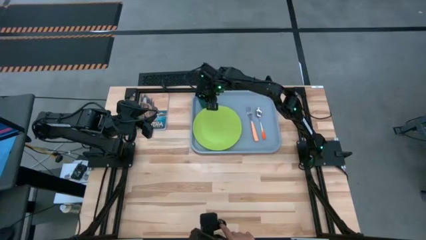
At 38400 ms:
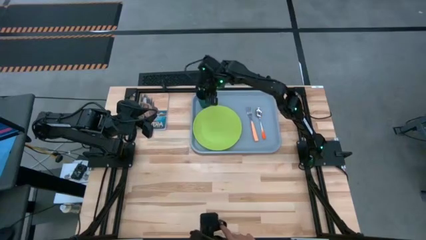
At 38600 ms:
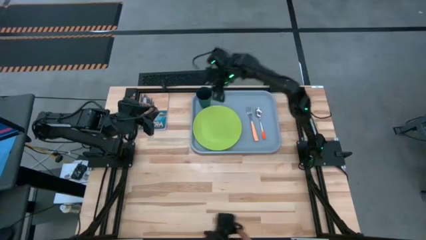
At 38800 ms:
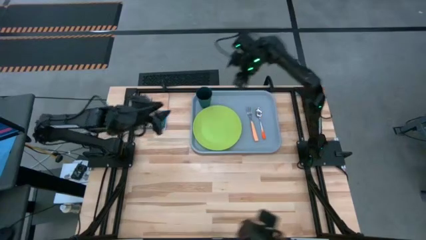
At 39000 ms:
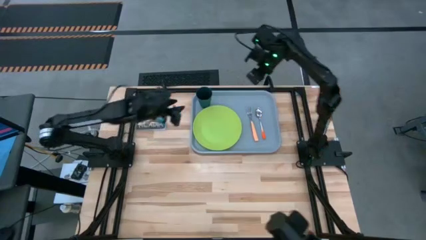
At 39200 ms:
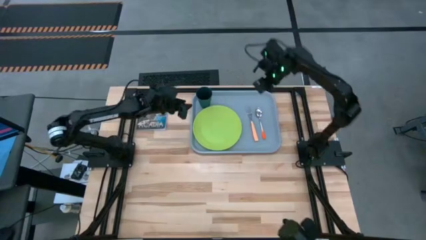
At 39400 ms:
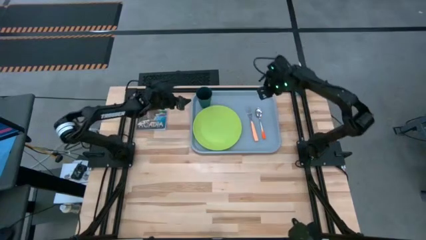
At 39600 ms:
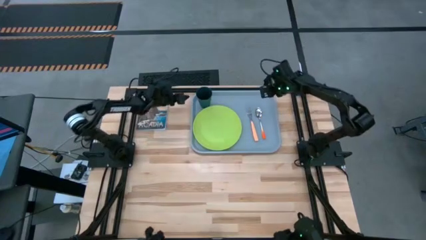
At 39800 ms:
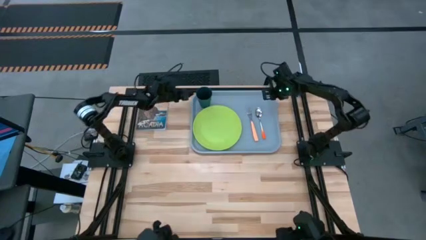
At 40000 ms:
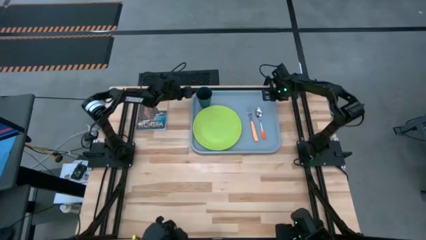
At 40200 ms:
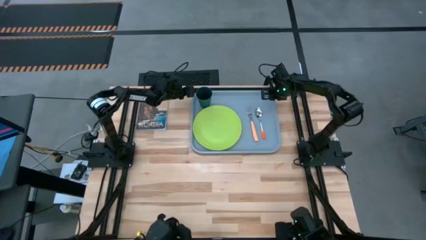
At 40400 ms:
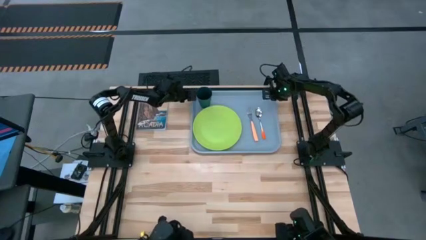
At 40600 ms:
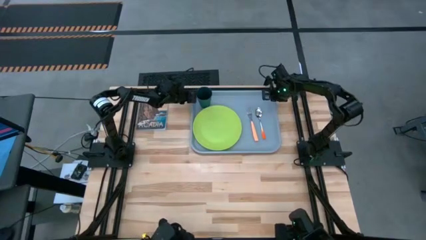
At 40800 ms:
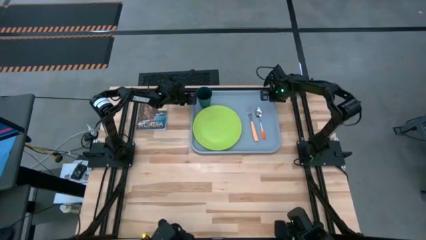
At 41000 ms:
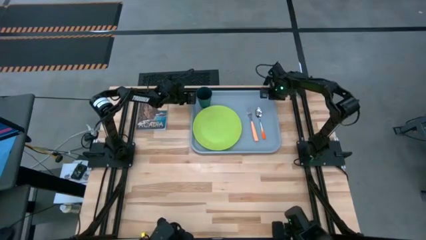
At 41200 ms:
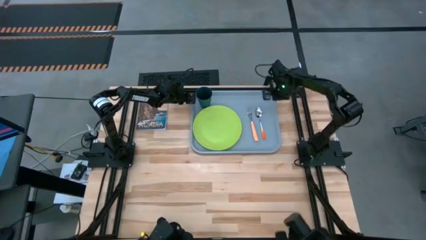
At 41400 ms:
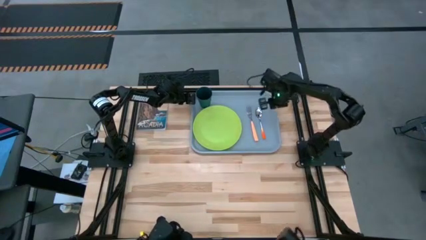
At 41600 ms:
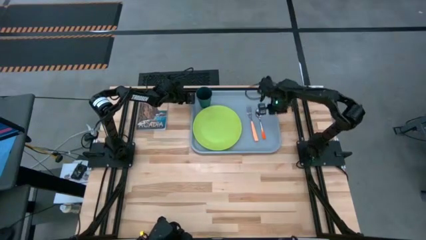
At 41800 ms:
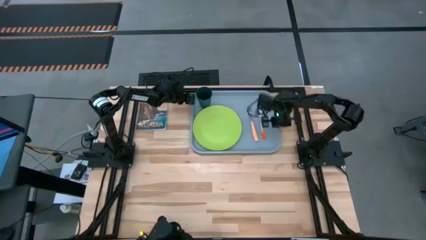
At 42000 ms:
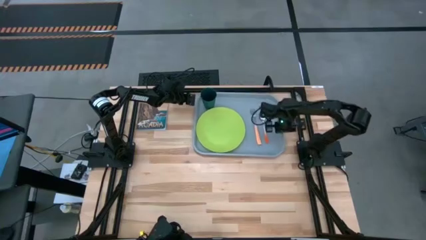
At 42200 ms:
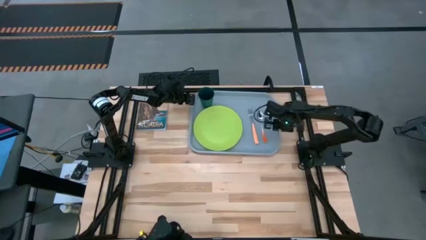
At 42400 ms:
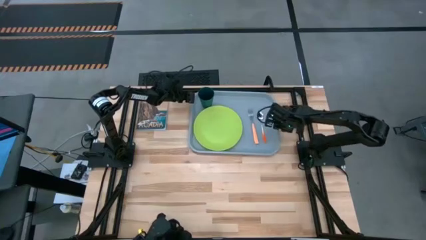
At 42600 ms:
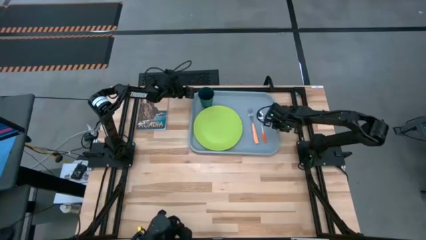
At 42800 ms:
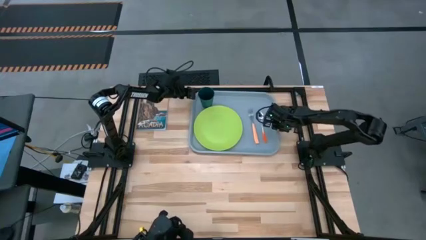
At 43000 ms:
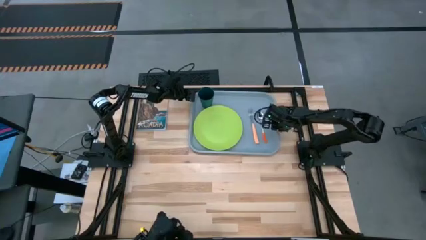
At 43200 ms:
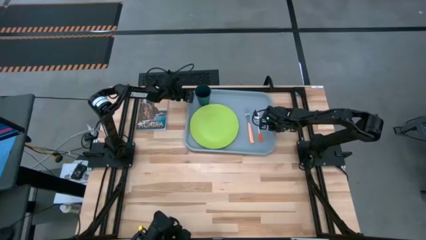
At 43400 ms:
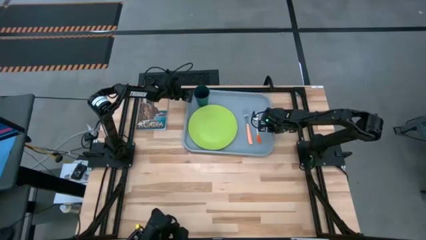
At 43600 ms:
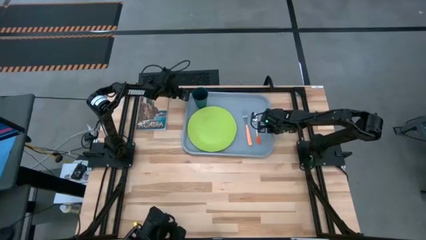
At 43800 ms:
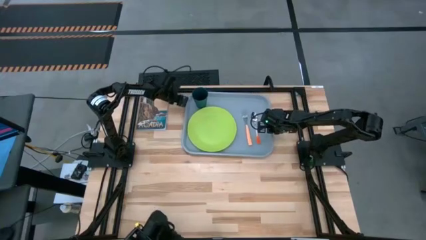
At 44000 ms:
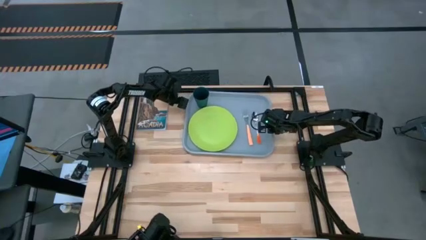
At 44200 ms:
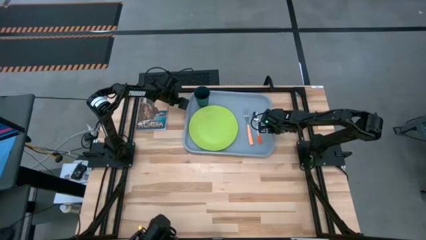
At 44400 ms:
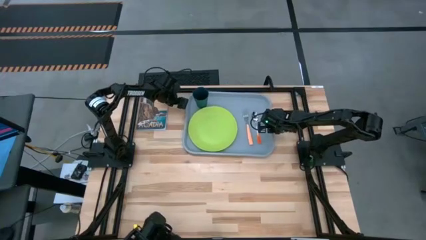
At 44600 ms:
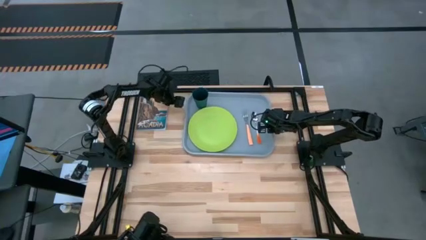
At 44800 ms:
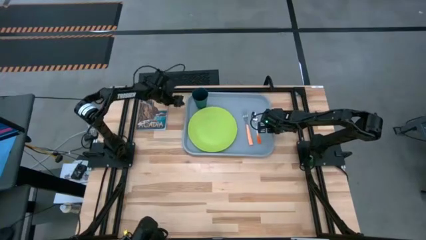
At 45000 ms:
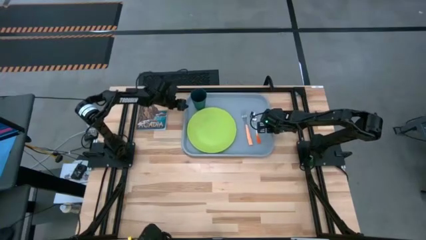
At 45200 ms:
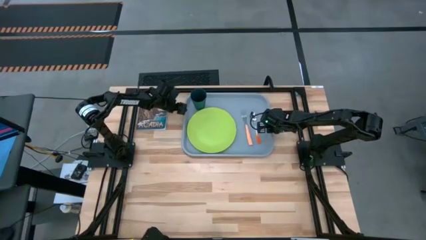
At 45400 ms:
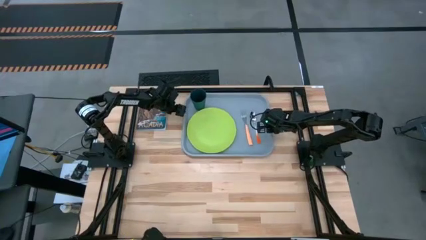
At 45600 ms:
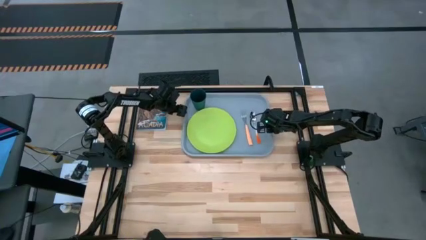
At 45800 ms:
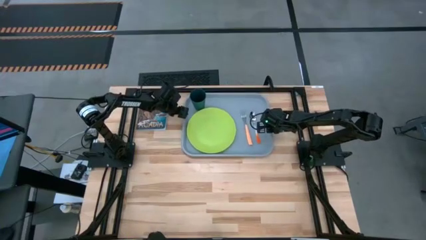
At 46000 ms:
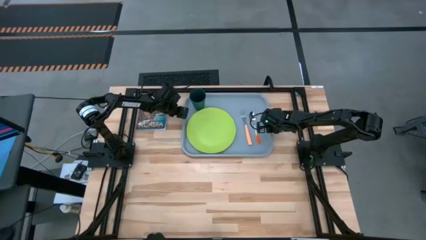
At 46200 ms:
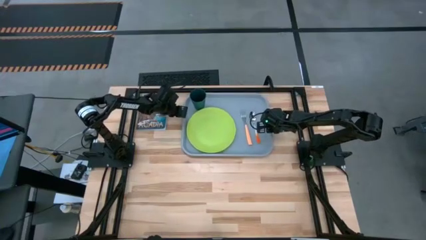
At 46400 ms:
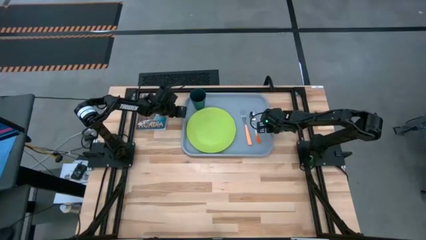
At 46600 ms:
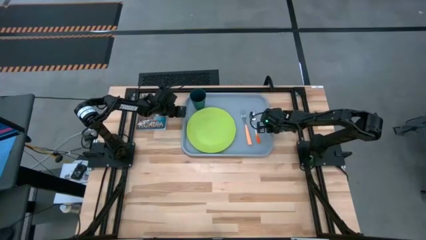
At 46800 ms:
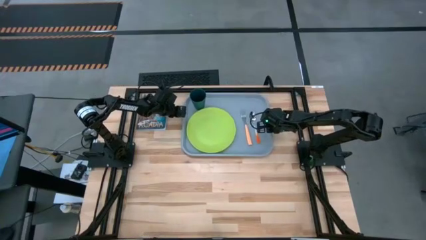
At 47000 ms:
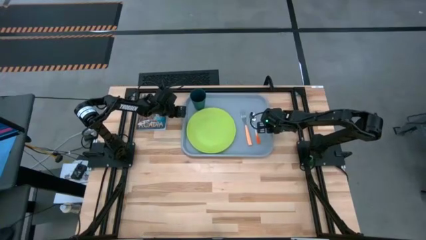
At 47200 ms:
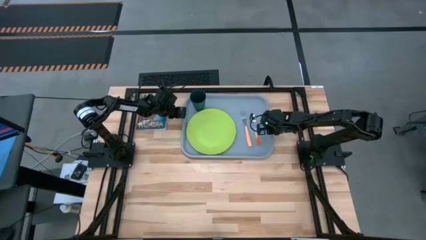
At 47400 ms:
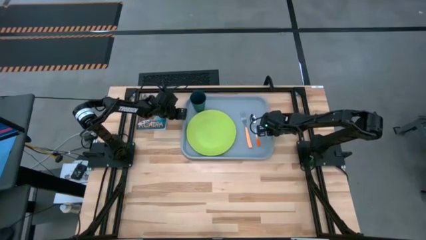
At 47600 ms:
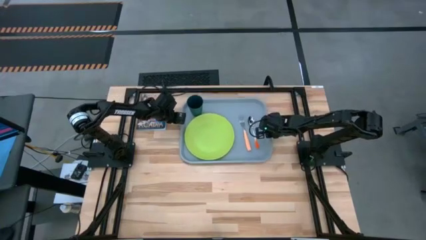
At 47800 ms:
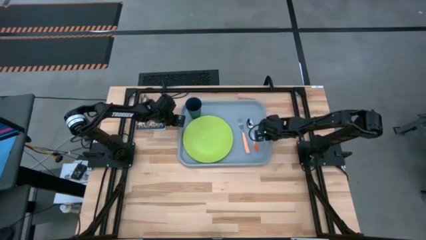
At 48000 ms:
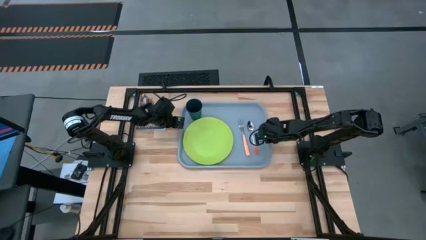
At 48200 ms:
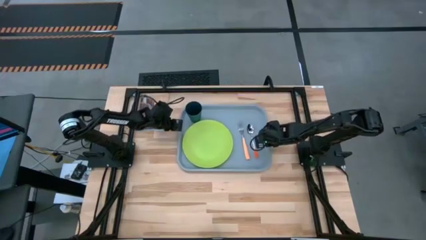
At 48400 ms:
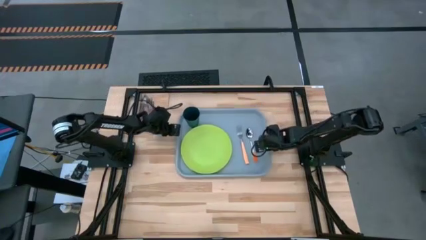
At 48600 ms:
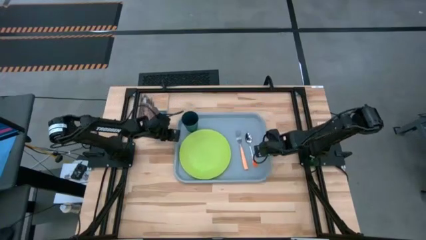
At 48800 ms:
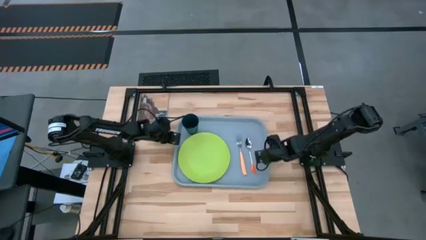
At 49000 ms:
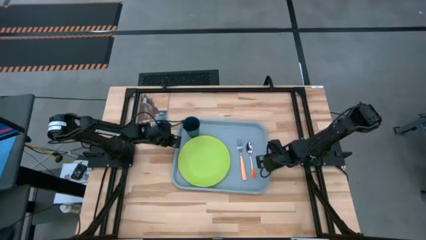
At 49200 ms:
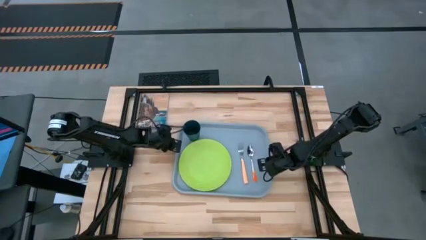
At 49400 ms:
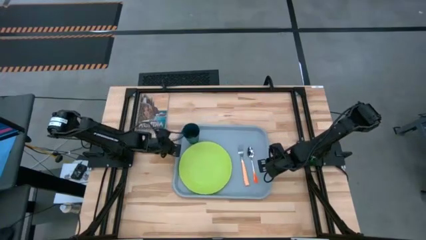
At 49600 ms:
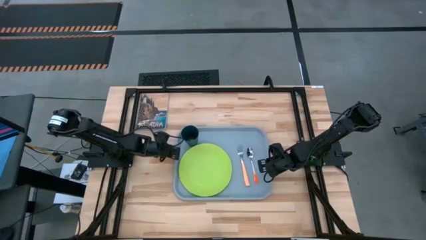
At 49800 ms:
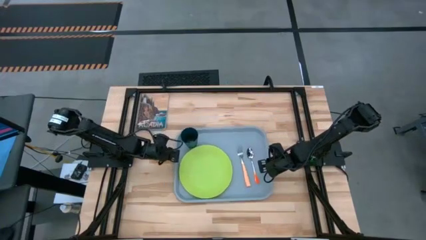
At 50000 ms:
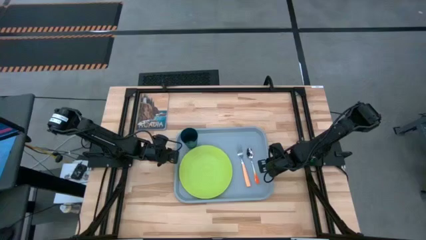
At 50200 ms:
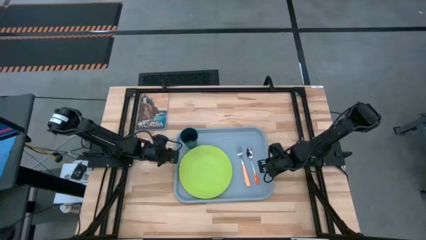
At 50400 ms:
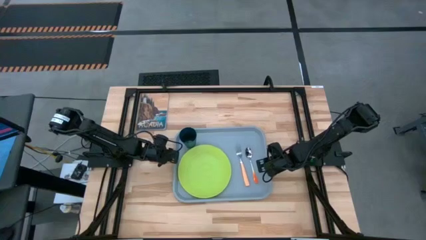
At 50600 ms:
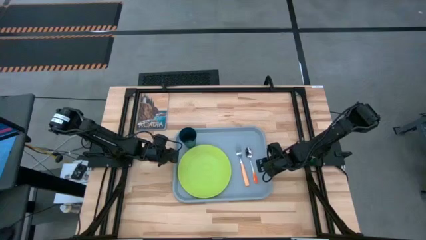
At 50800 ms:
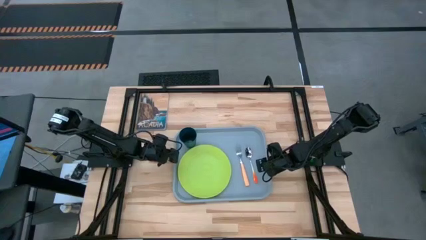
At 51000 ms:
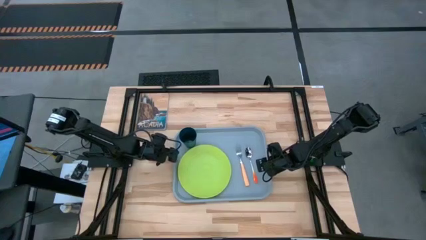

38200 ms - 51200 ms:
Task: Pick and place plate/cup/fork/spoon on tray
Move the gray tray to the center of the table

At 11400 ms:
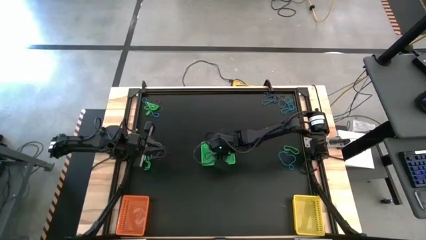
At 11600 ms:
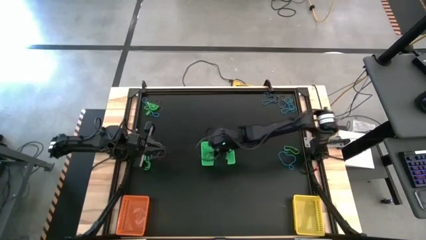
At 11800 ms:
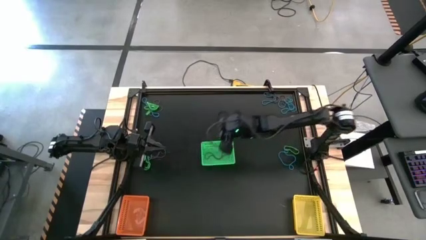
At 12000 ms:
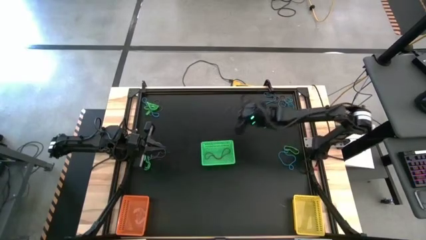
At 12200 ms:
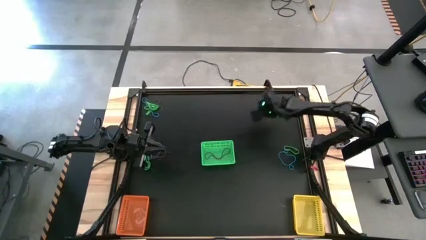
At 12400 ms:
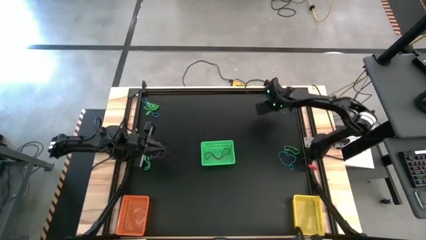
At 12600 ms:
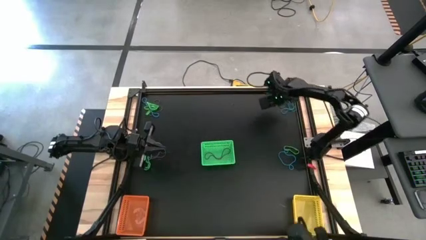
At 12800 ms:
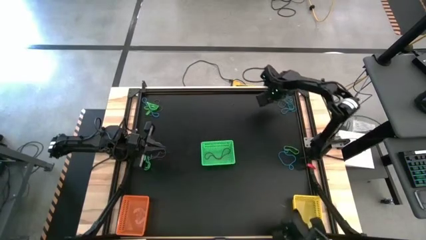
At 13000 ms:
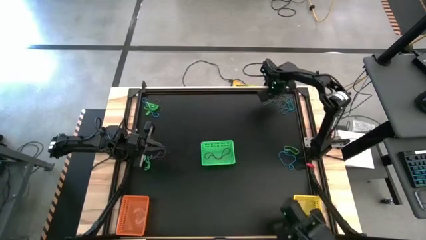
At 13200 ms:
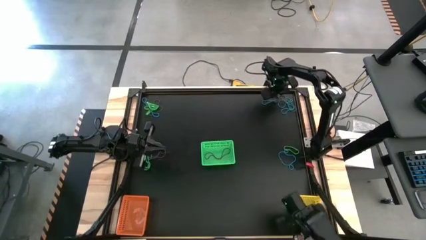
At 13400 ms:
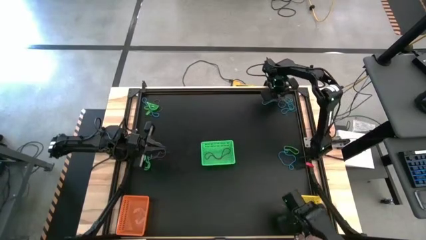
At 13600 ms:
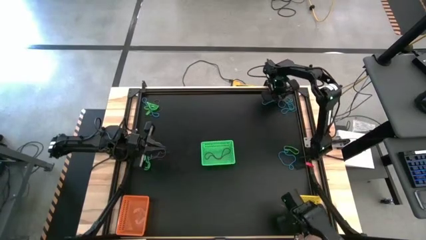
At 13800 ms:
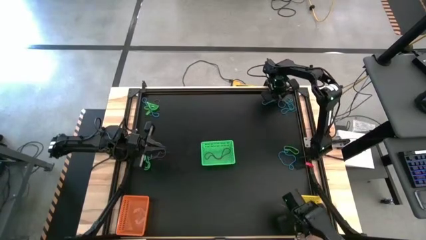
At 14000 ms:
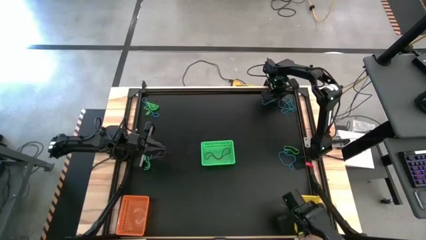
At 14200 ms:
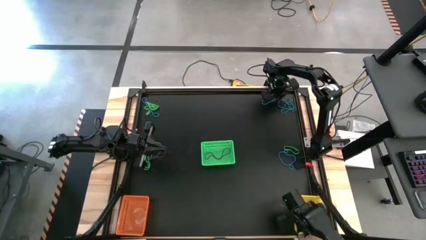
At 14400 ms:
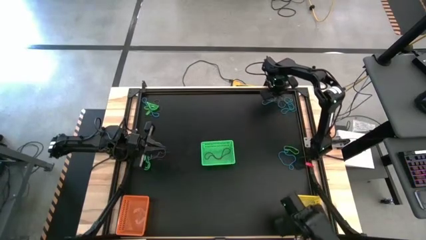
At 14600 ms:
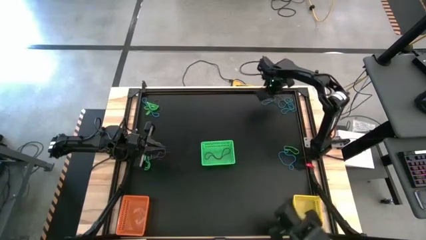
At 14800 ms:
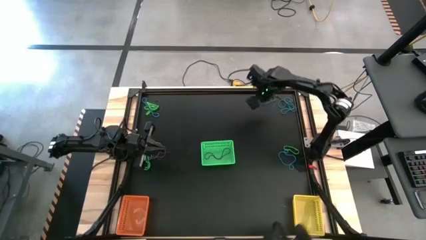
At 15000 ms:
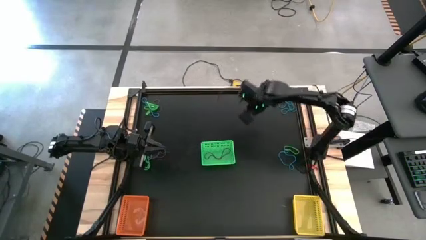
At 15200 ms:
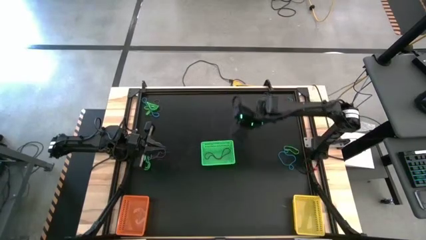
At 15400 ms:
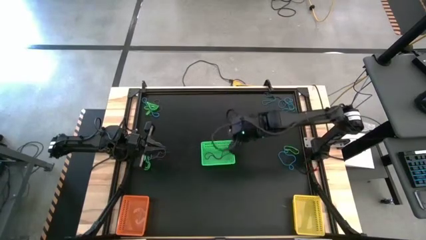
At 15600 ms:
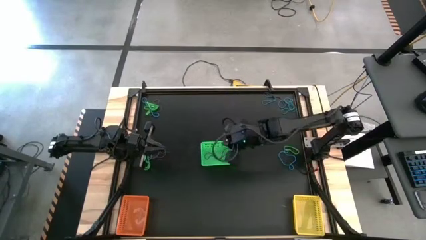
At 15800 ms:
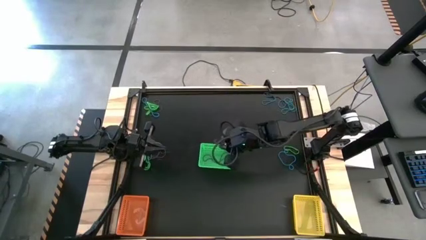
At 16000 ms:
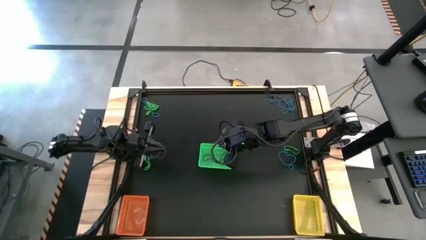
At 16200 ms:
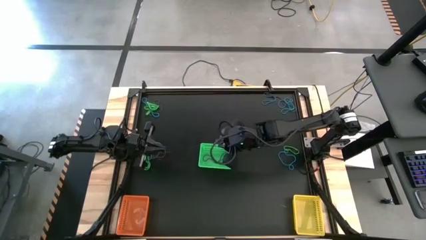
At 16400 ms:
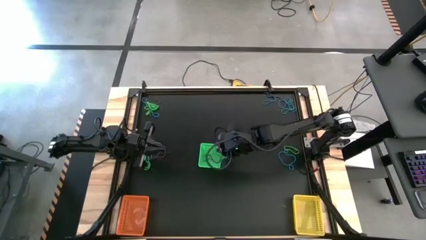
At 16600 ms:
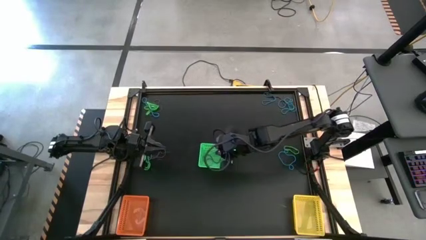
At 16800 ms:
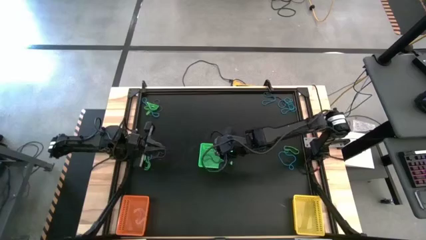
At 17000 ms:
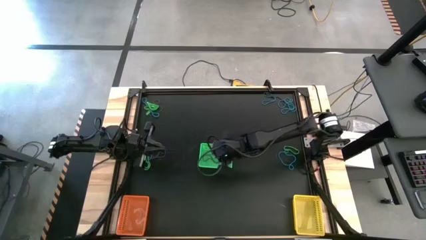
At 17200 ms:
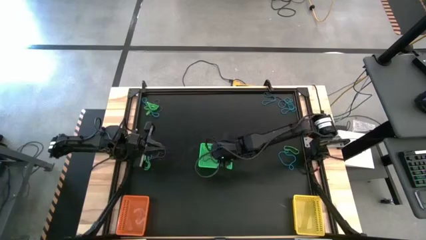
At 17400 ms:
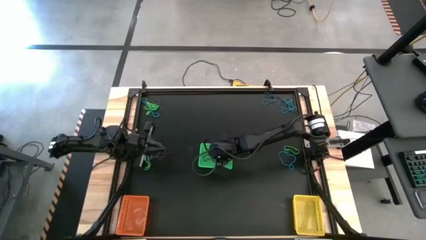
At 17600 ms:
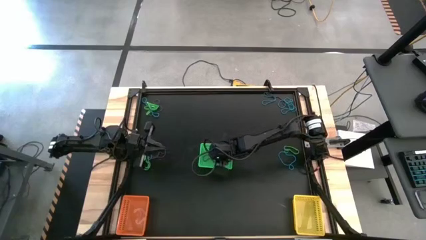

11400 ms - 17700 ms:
Task: Sort rubber bands into baskets
Put the violet rubber band into the green basket
